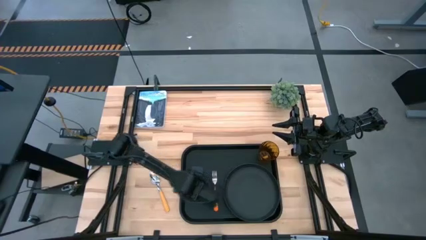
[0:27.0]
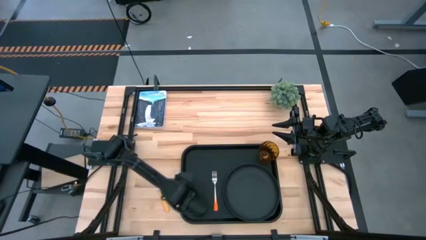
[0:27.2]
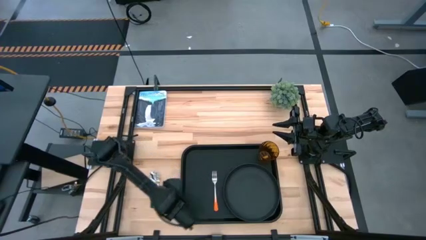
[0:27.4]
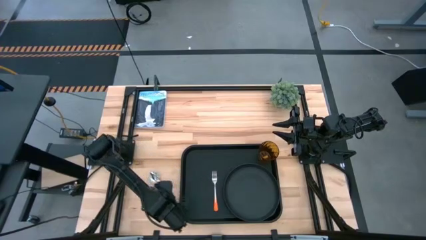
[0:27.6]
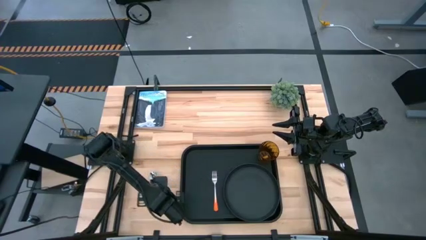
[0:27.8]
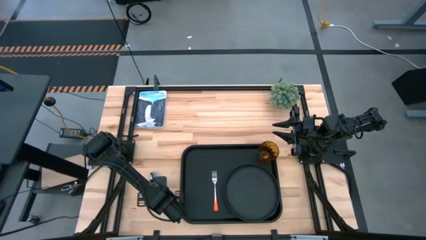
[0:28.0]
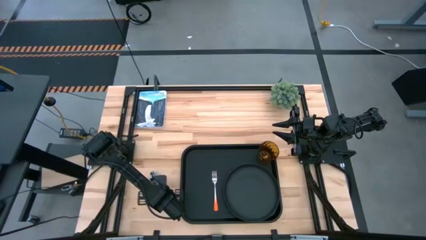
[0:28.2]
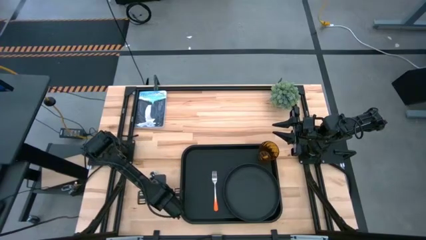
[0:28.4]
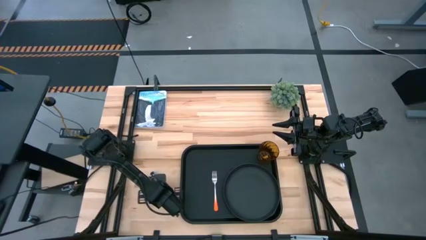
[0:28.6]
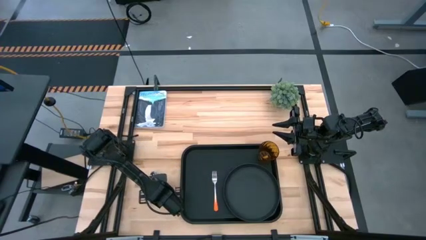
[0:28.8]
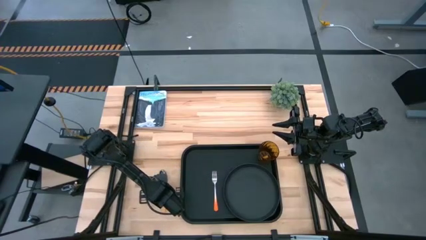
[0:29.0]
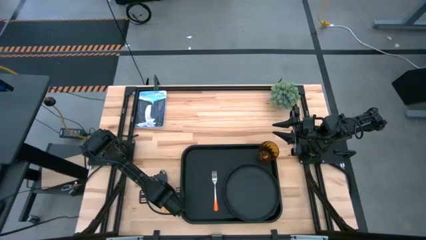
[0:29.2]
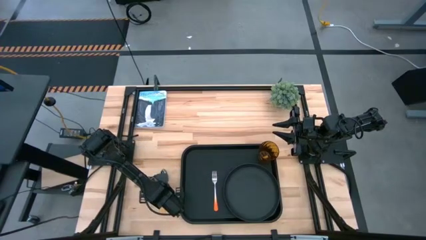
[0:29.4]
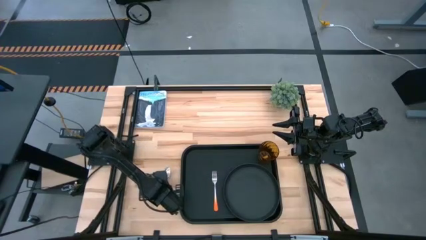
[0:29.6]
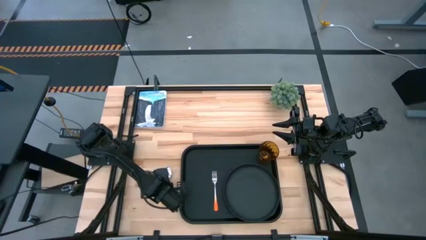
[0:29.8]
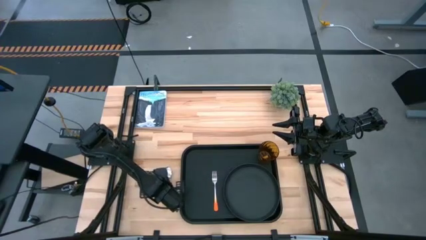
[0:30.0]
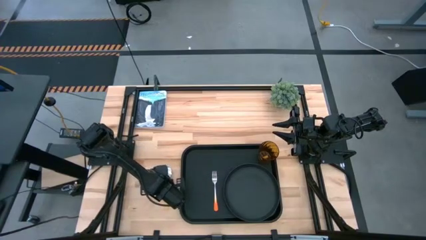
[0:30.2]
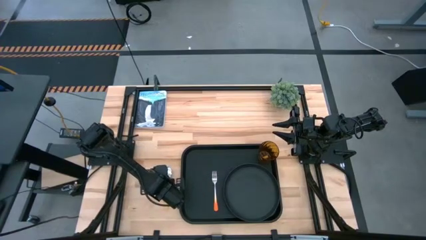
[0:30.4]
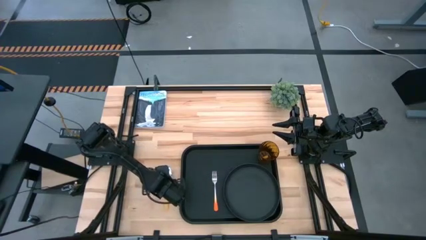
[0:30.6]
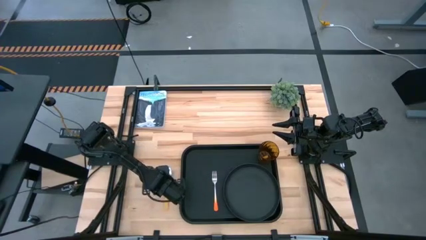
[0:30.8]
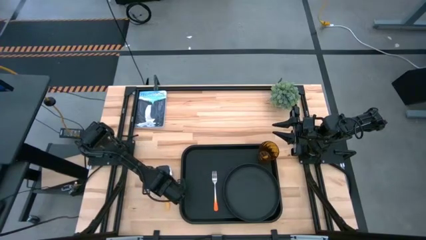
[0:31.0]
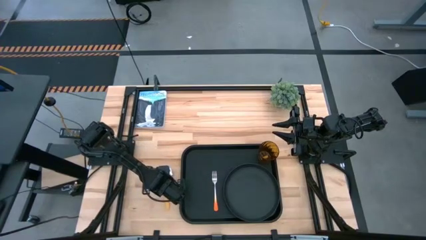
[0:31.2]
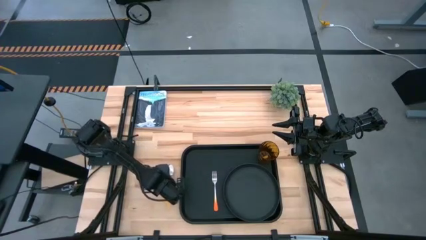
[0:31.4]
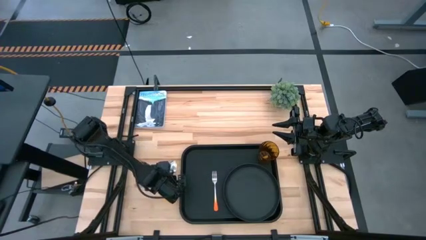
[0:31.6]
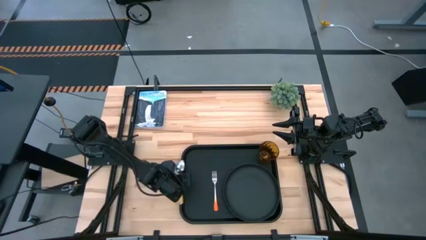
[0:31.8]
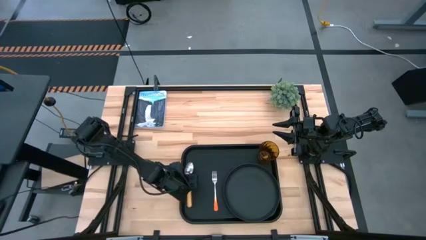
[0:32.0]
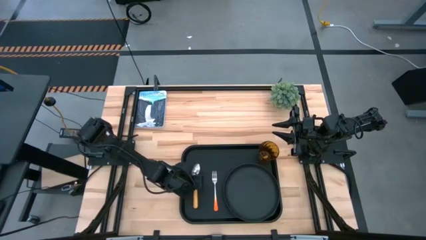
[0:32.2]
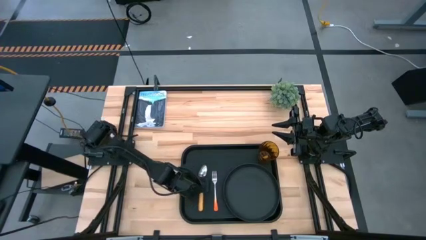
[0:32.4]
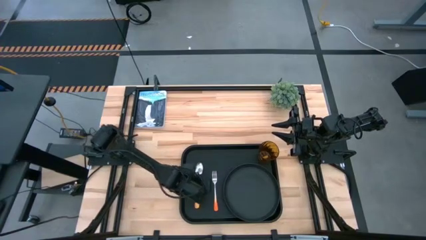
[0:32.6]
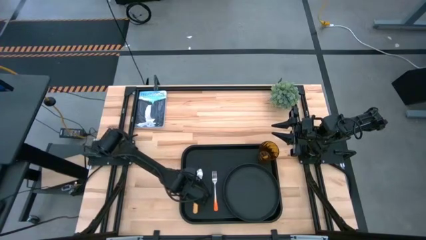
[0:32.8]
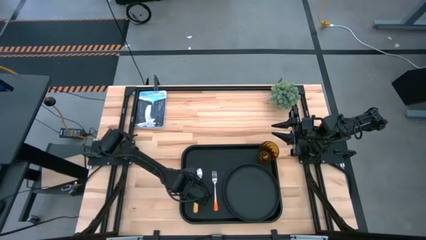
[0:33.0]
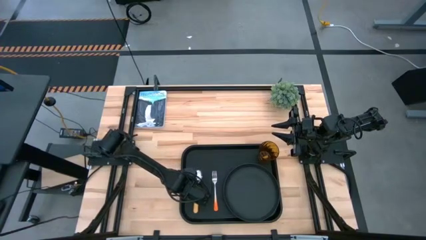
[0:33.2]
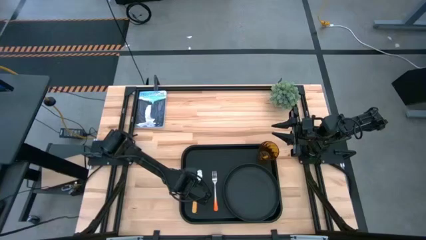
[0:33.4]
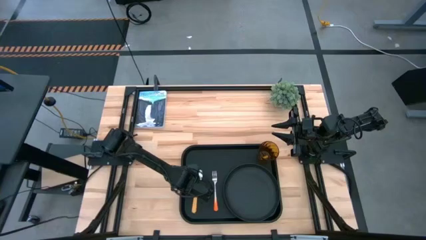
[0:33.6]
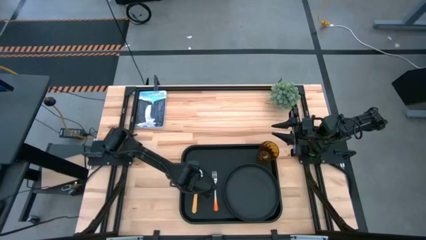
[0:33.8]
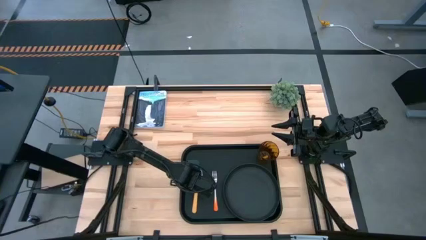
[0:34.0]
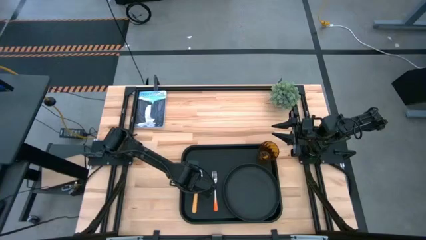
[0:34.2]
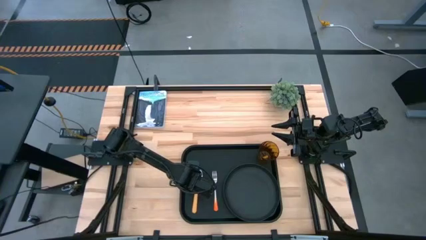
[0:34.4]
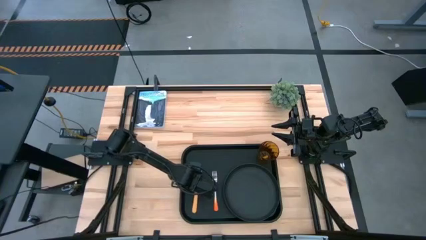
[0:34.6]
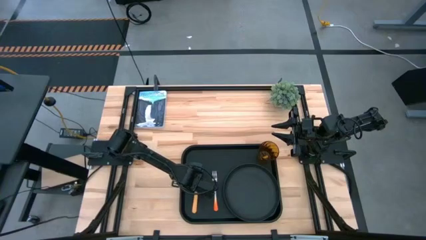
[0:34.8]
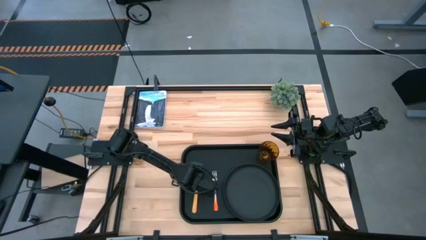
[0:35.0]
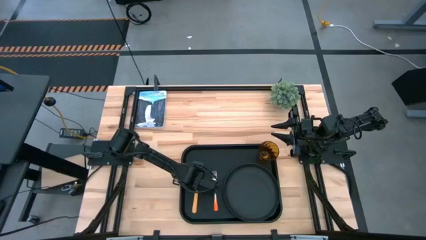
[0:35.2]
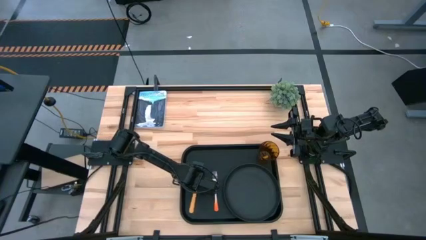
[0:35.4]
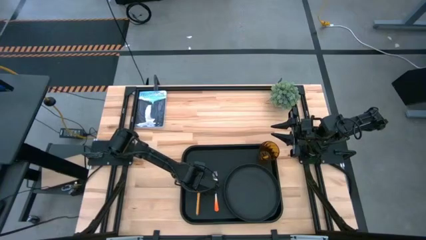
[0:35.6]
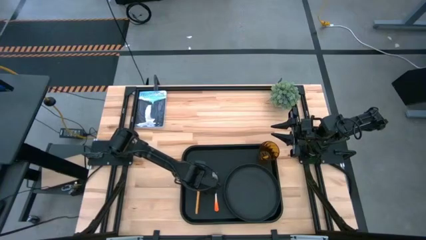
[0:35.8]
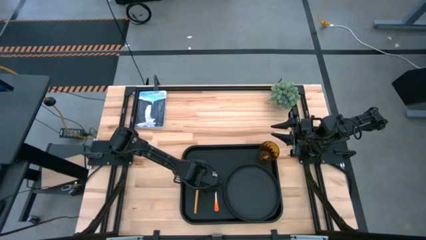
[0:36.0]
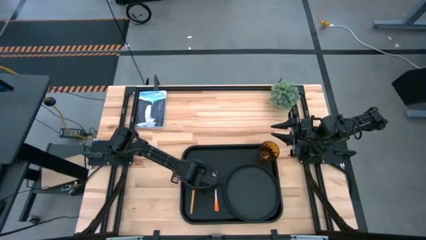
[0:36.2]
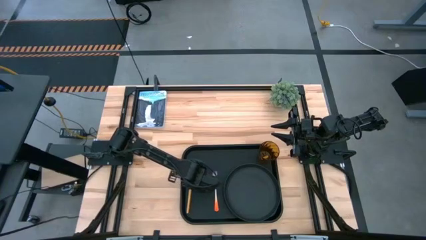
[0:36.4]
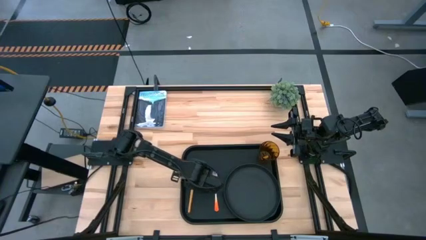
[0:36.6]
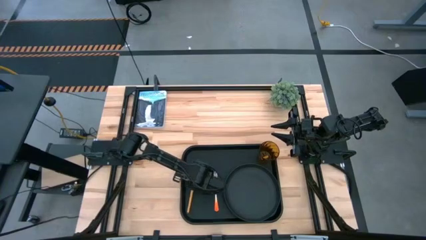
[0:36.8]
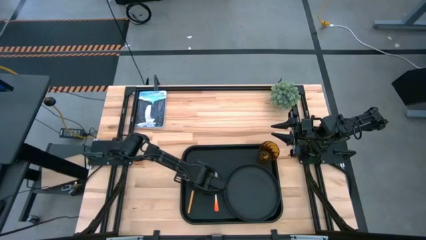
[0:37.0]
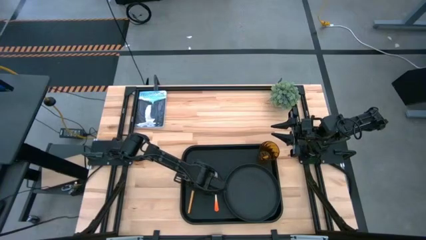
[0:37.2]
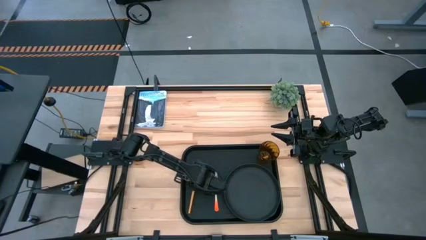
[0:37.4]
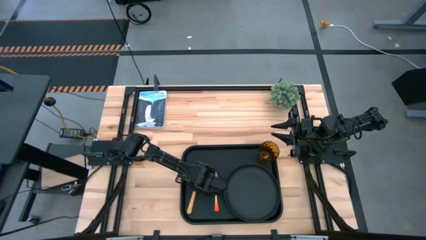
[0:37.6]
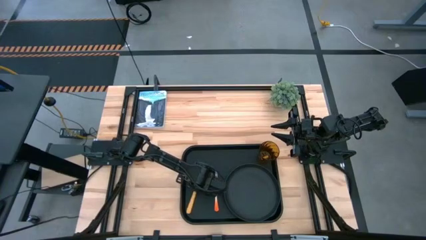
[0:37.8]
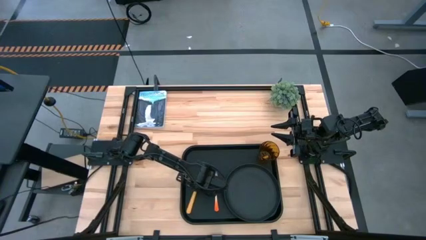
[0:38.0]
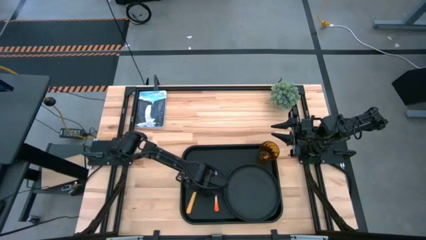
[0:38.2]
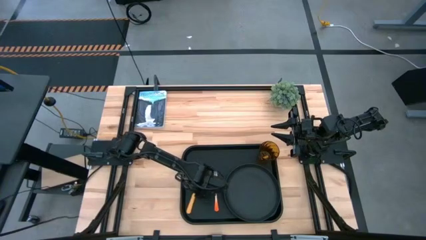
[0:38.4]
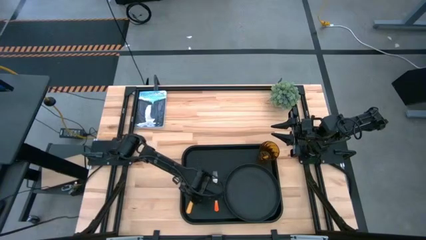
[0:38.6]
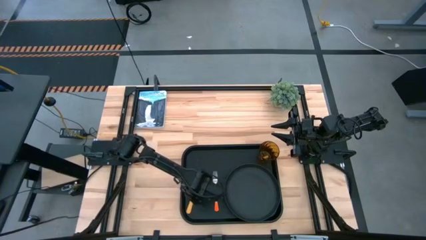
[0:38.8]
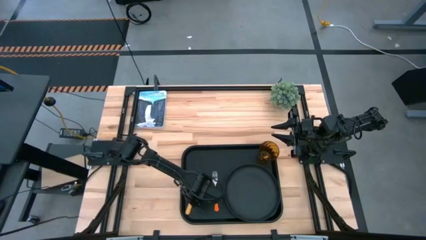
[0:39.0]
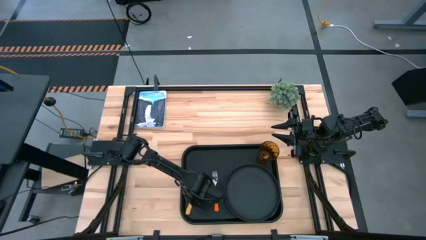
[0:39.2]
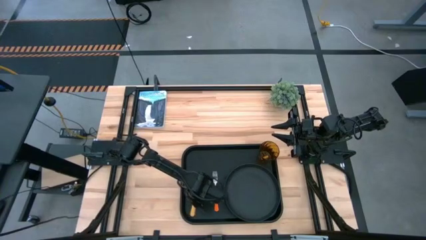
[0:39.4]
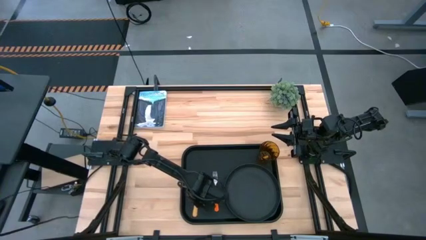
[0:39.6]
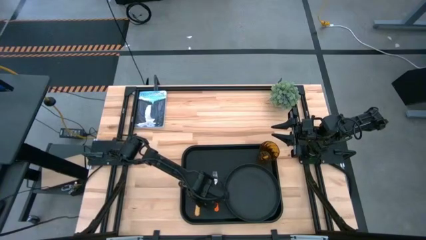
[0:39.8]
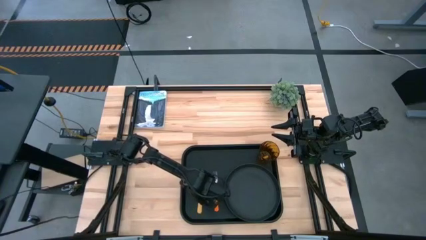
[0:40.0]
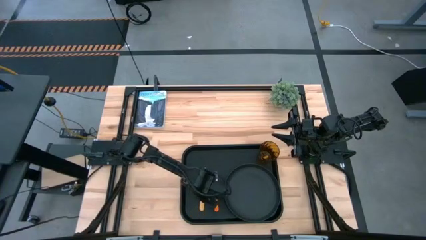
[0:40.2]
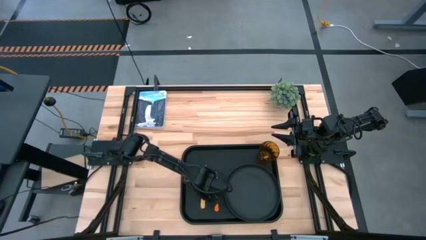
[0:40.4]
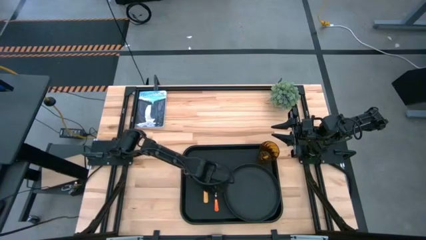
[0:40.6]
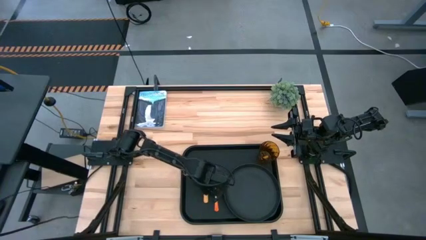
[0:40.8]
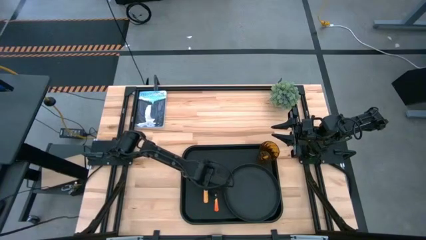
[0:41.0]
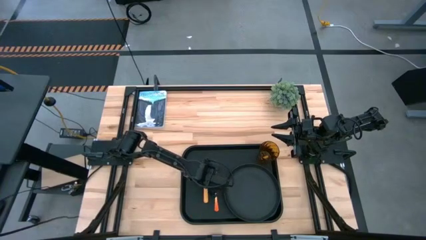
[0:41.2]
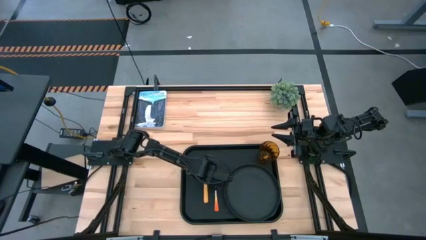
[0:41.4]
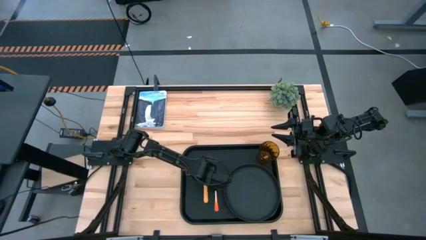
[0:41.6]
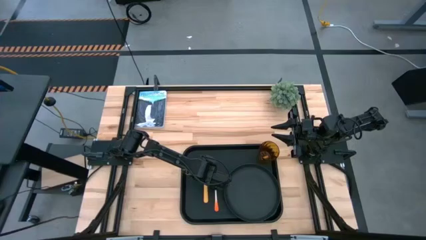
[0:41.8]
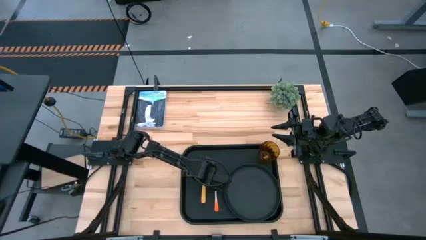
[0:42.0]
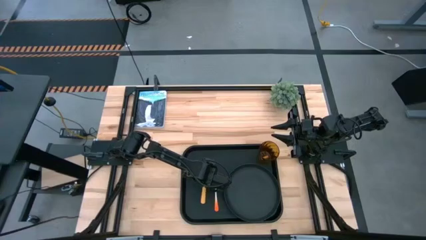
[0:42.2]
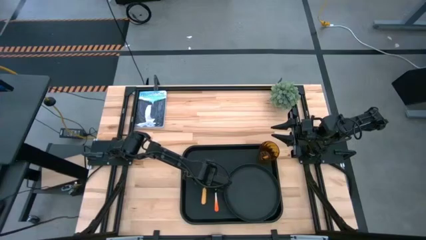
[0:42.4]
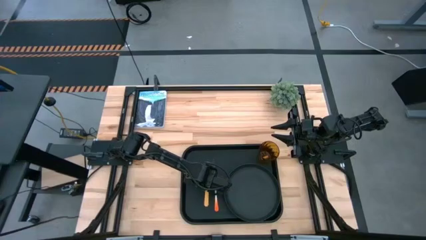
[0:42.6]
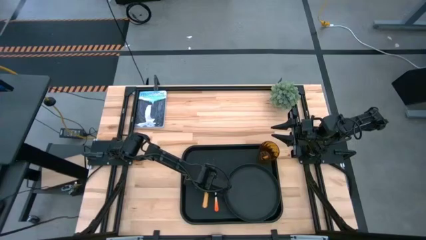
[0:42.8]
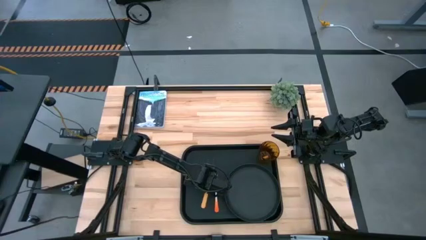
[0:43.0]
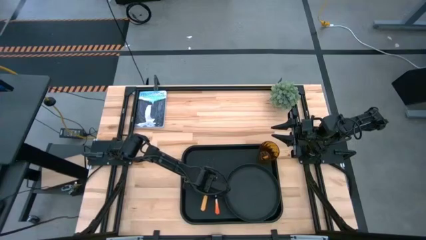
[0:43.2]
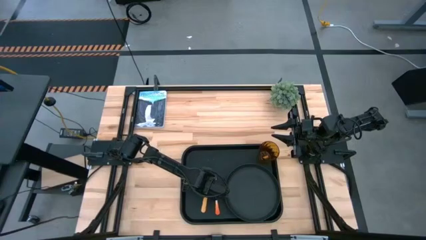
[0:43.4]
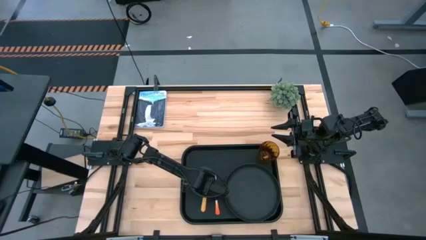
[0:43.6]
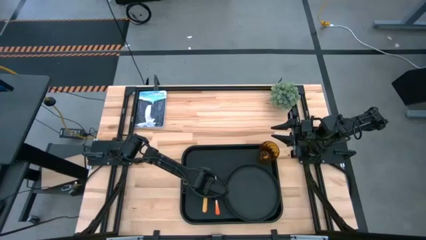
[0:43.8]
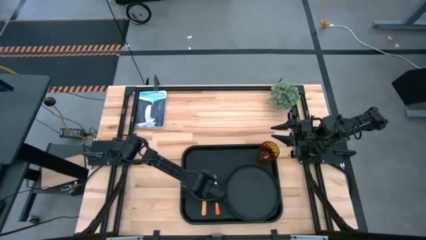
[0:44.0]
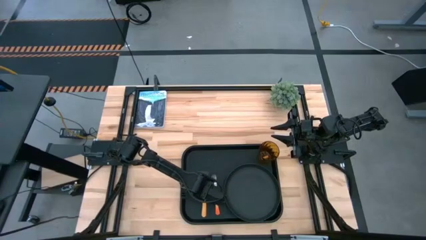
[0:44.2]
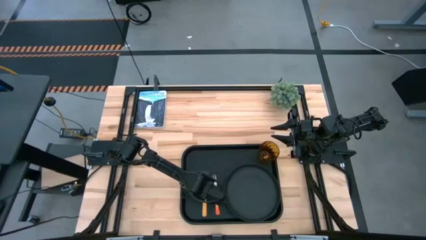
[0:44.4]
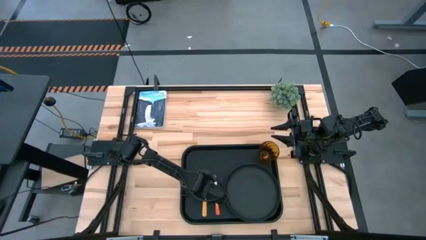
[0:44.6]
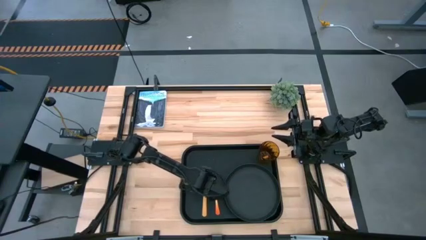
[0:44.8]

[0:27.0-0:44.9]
Task: Pick and place plate/cup/fork/spoon on tray
Put the yellow spoon to the left side of the orange fork on the black serving tray
